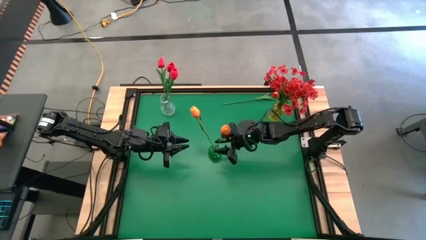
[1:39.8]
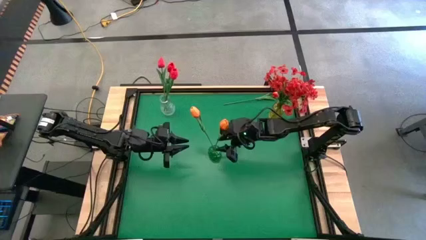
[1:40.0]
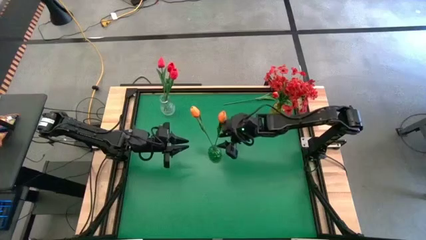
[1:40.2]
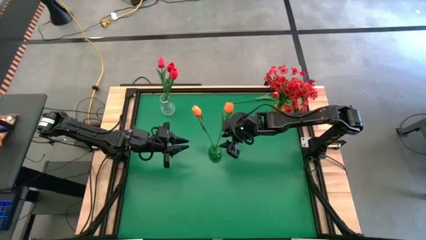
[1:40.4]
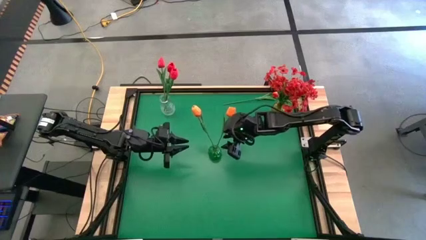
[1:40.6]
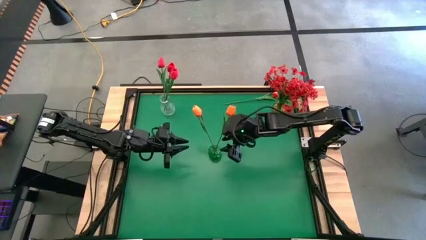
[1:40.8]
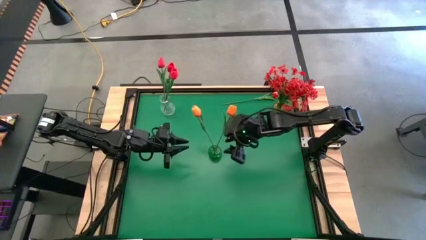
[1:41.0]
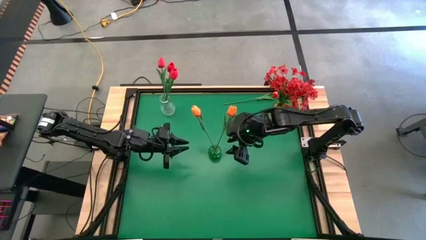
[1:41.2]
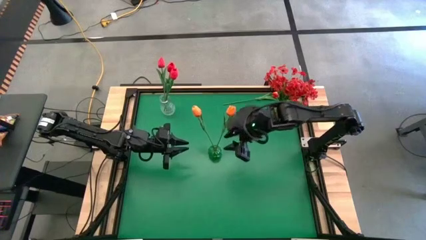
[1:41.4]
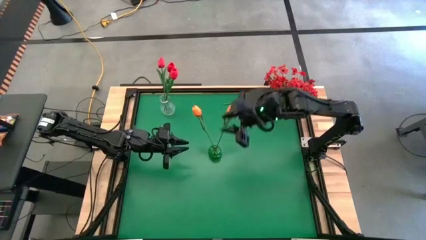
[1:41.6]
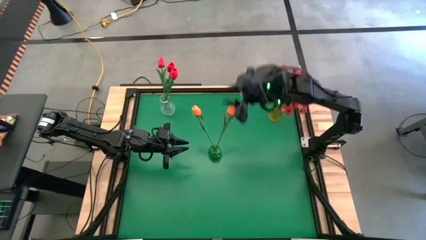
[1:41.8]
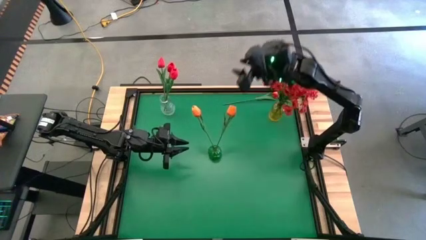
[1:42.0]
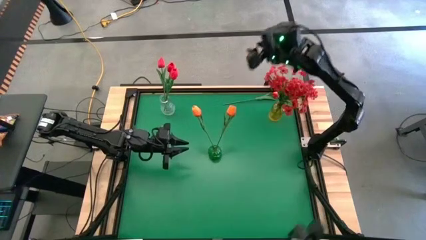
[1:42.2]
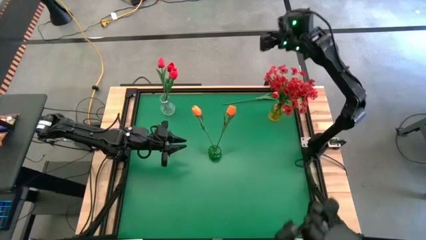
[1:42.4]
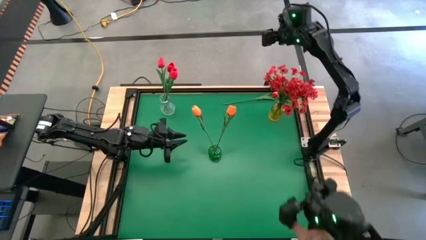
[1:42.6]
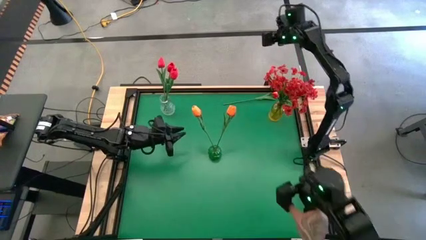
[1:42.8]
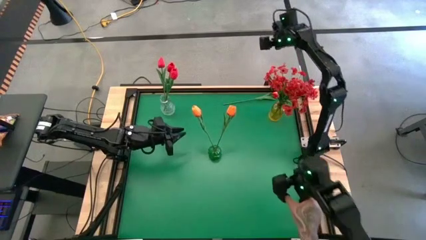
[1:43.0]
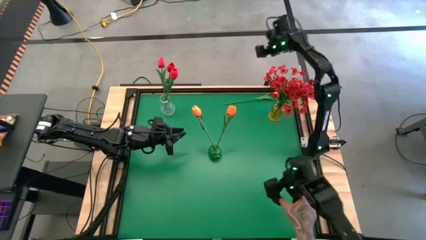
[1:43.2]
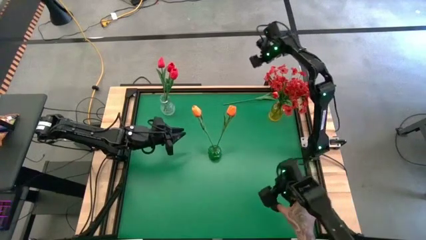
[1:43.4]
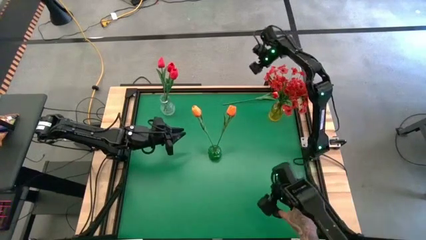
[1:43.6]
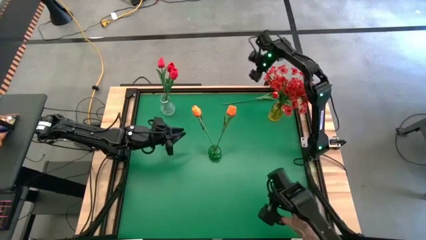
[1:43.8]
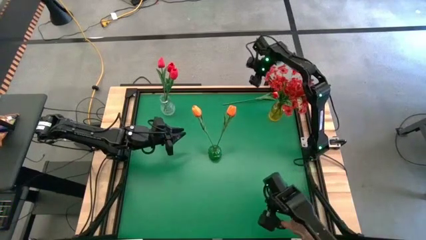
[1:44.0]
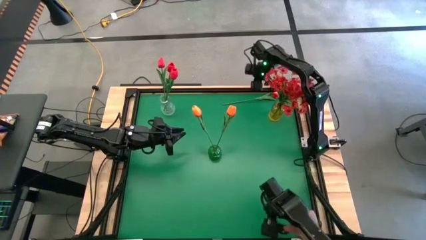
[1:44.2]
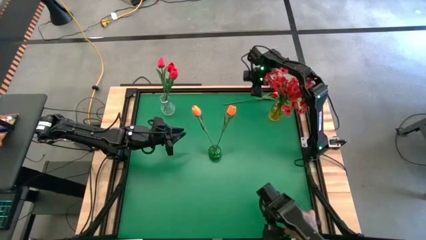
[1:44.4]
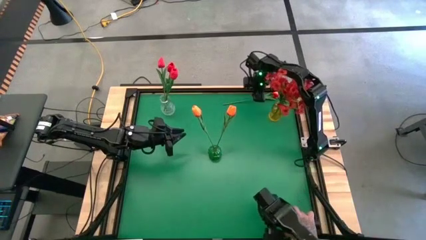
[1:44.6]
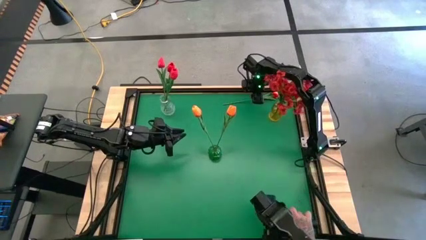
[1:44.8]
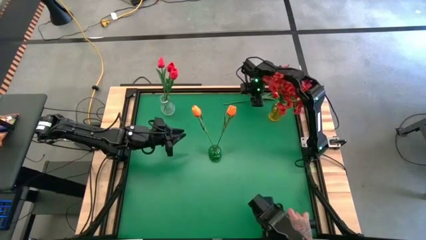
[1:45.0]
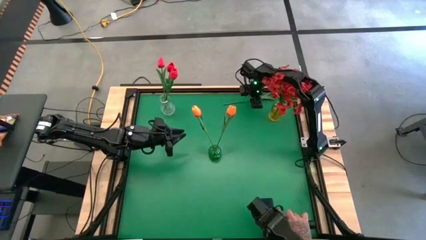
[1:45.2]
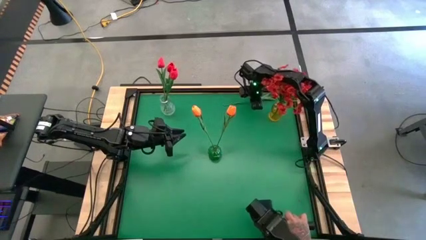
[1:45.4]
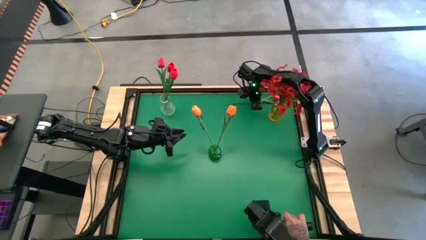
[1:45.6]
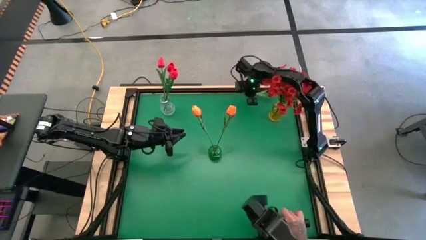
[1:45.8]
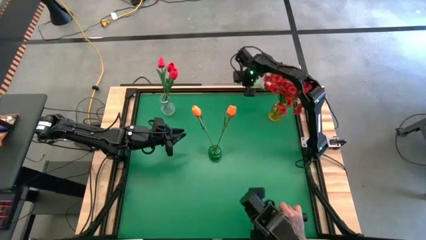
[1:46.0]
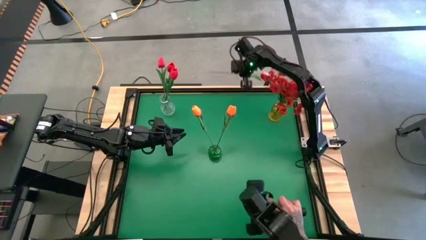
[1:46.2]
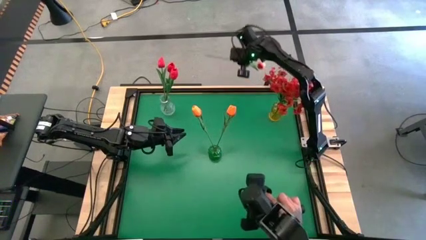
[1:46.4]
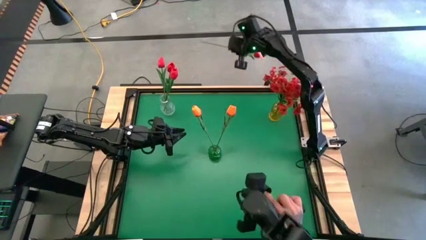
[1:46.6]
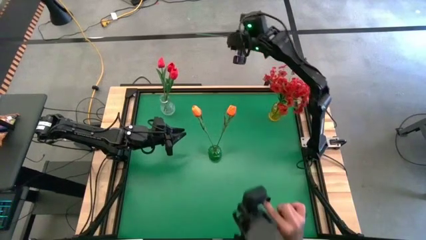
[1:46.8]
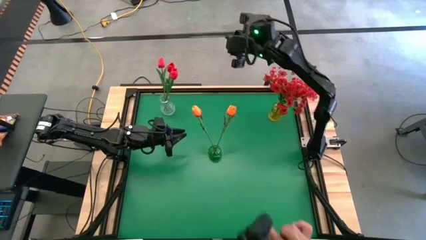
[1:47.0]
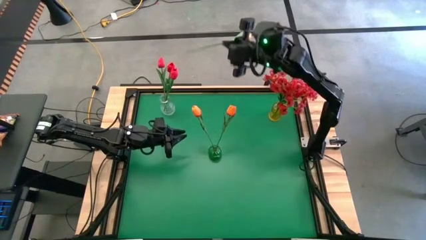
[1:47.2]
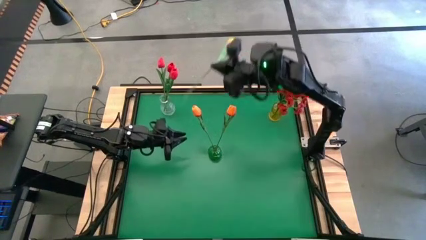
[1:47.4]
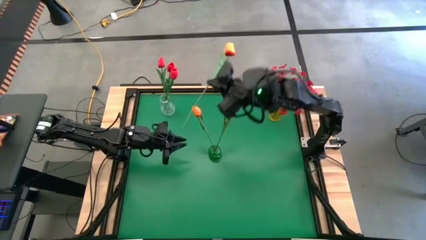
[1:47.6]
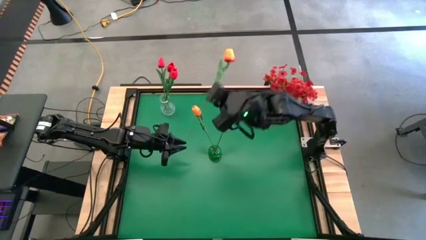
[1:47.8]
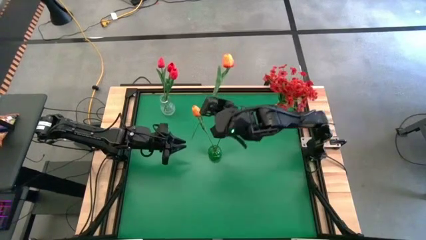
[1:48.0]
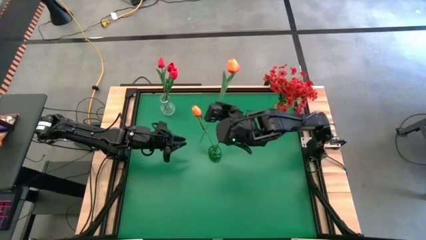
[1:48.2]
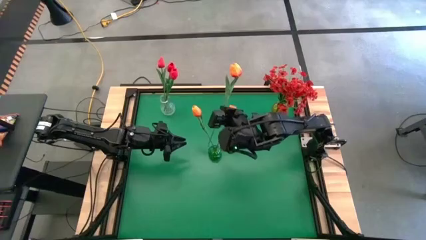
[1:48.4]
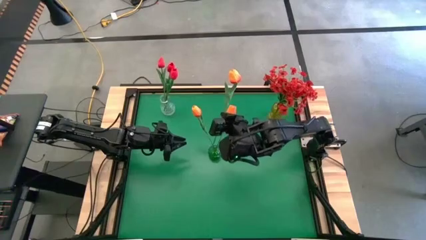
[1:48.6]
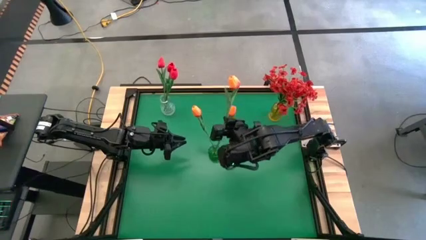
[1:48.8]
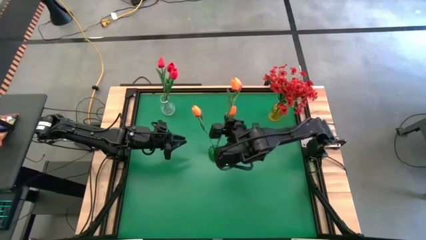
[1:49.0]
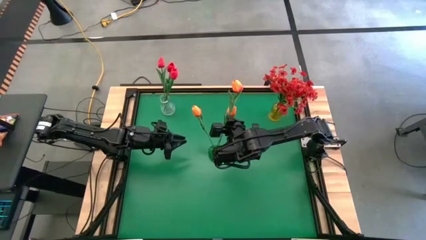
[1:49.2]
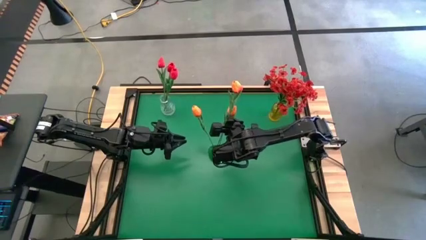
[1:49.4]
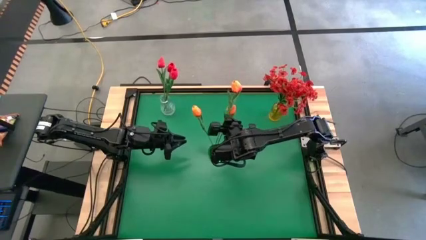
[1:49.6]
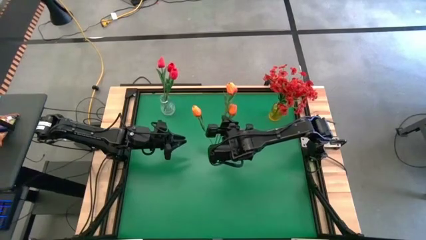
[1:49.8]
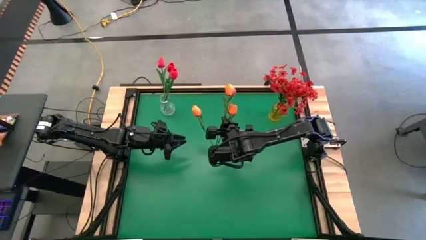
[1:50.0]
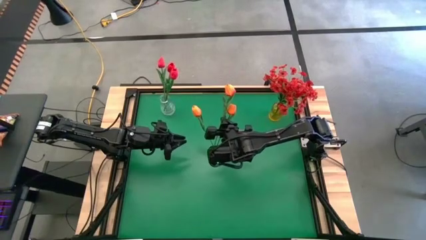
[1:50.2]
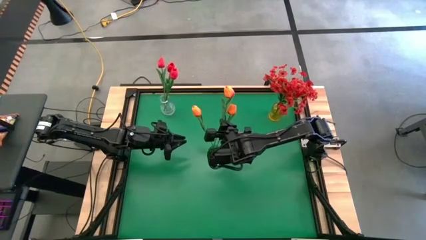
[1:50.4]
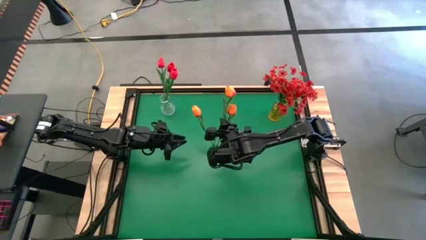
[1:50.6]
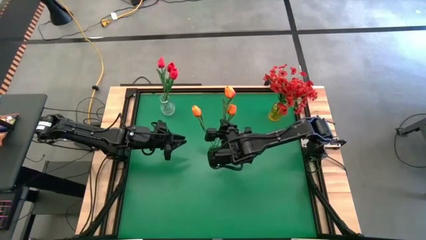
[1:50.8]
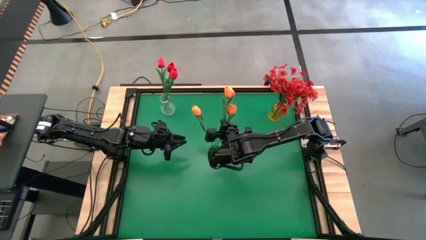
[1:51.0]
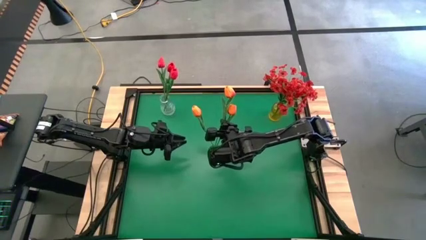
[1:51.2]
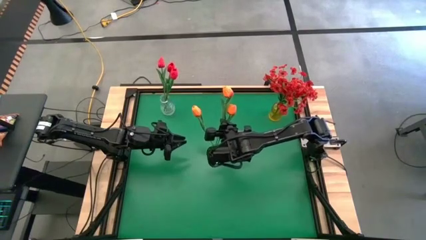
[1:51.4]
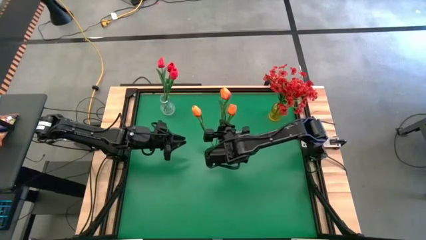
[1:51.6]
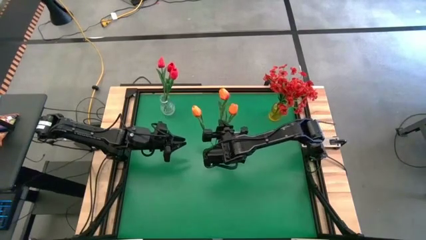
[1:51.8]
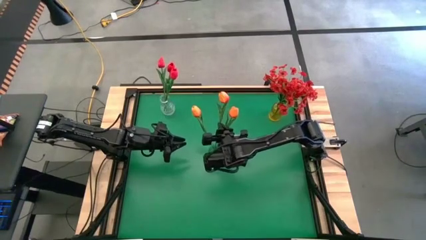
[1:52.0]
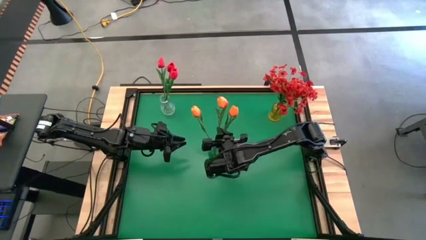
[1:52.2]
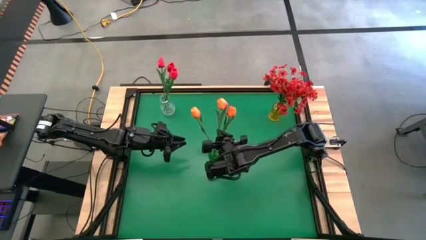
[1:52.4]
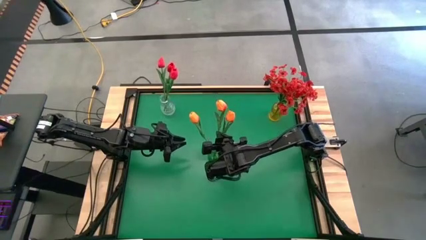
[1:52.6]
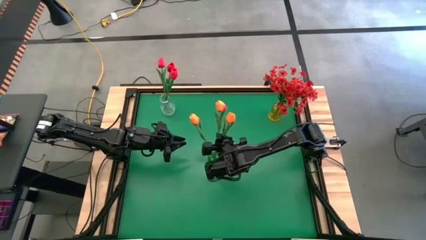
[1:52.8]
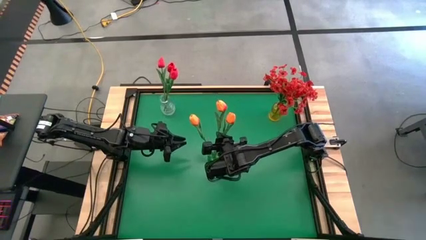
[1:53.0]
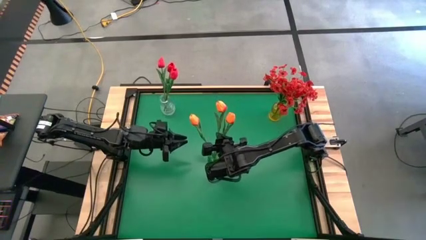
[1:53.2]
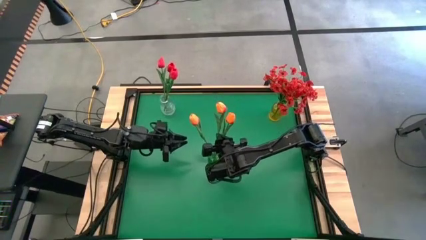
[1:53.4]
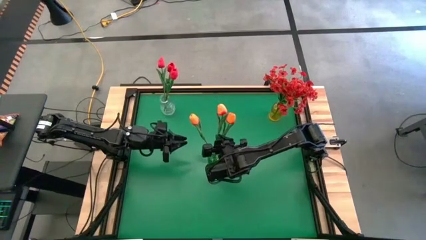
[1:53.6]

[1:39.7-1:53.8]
Task: Sort flowers into vase by color
Put the orange tulip into the green vase

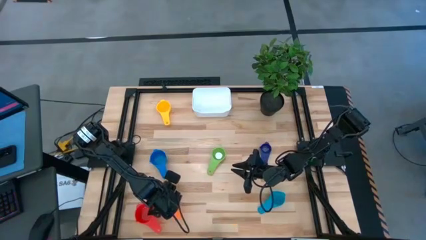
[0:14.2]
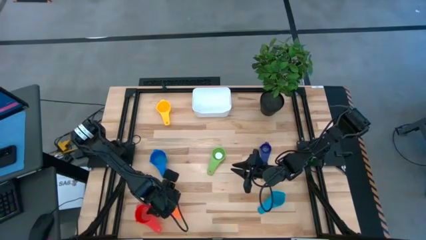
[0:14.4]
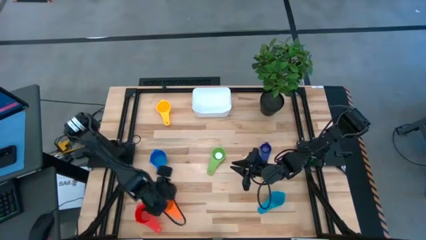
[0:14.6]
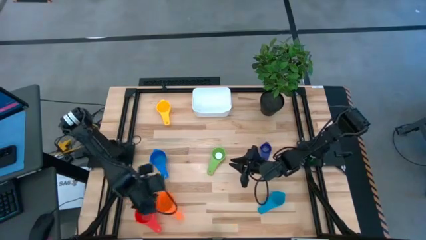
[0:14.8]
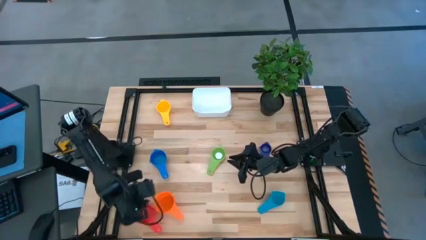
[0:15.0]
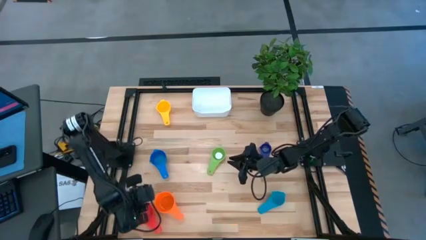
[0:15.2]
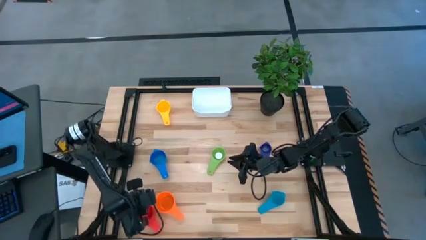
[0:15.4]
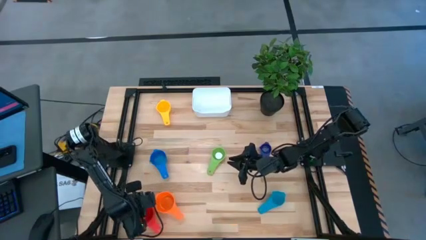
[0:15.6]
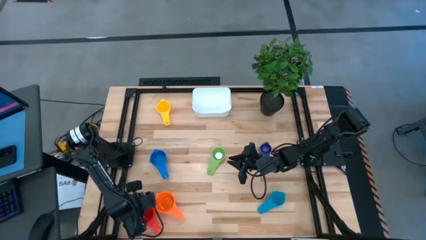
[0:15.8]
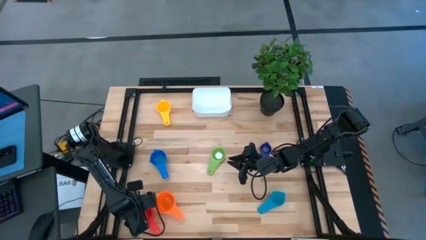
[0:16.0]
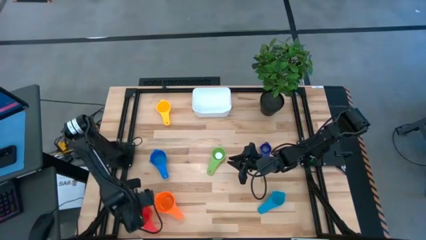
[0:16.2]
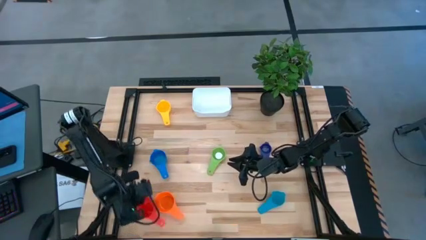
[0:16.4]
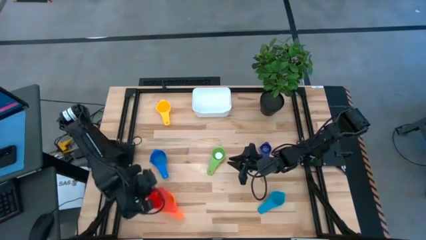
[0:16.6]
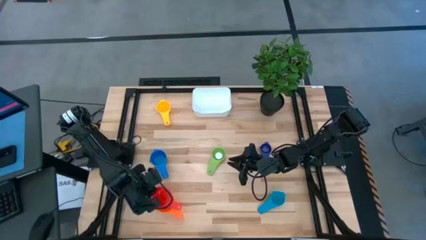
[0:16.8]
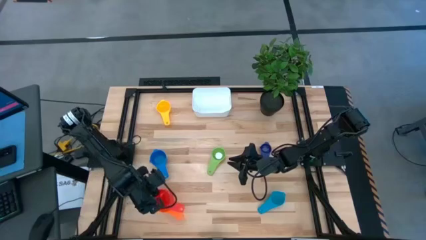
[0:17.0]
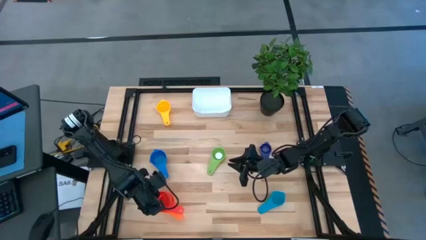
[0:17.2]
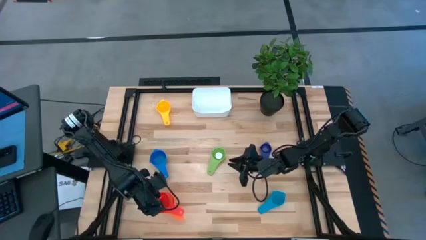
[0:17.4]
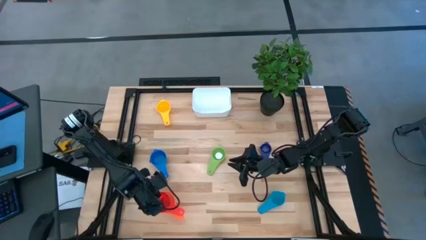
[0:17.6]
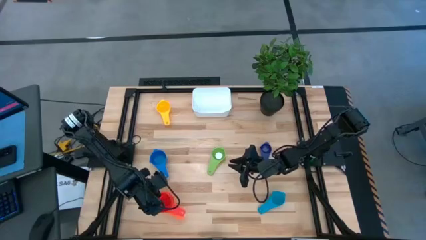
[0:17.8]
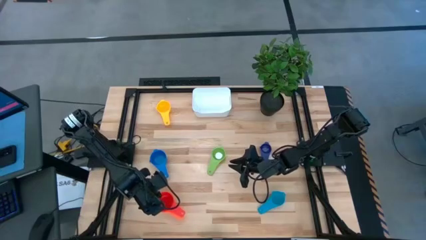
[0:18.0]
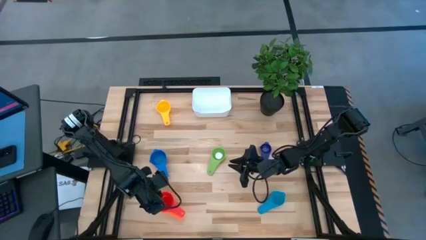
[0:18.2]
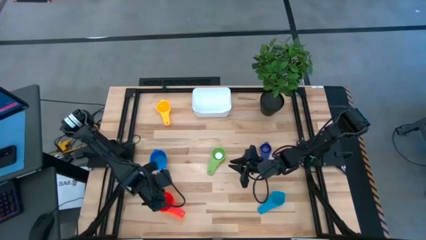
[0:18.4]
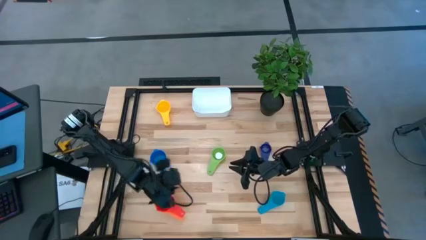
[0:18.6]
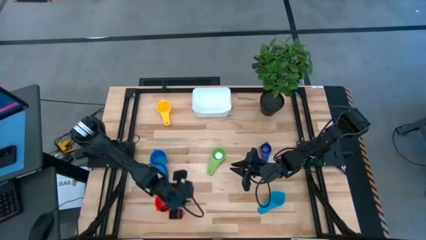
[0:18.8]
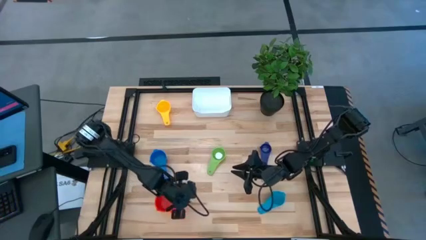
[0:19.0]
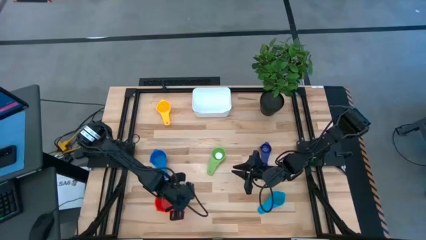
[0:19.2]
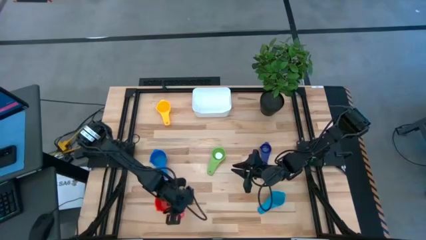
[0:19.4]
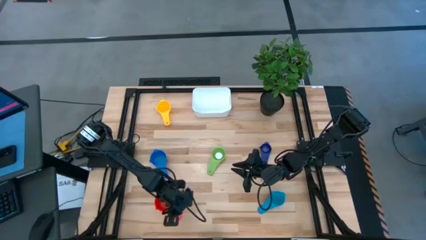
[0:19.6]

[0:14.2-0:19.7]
Task: Nest measuring cups in basket
Stack the red measuring cup into the orange measuring cup
